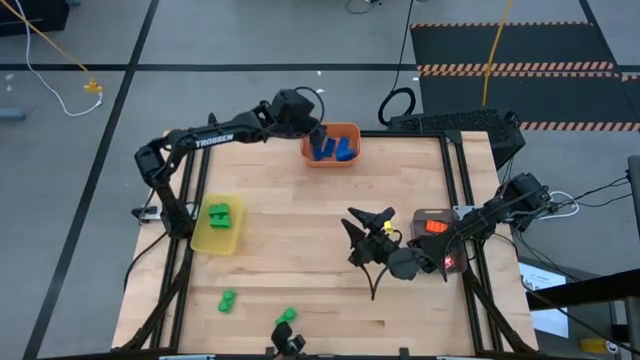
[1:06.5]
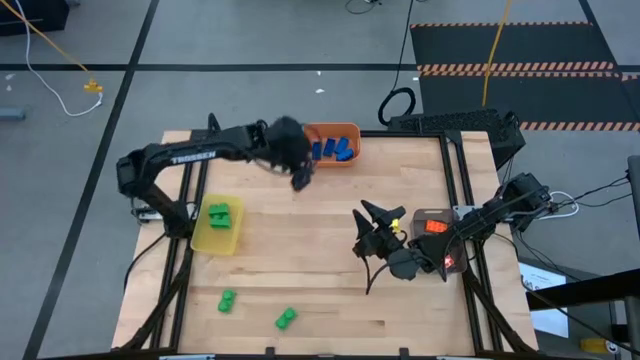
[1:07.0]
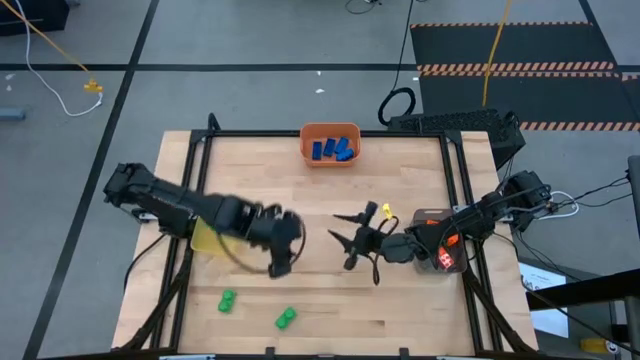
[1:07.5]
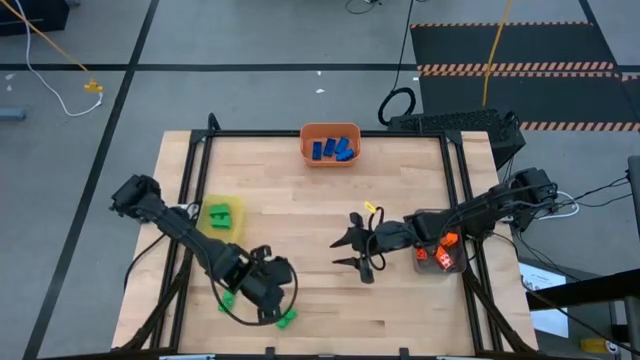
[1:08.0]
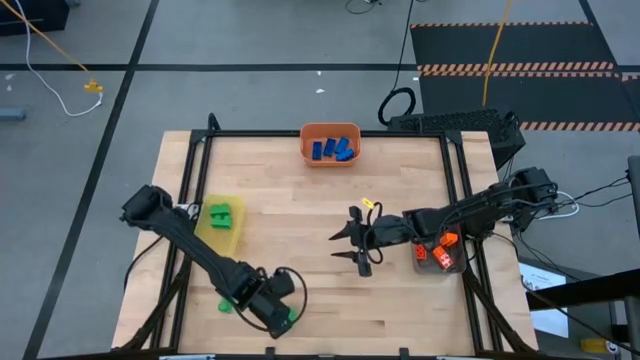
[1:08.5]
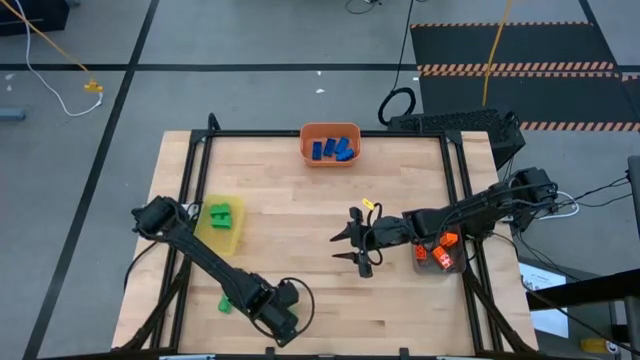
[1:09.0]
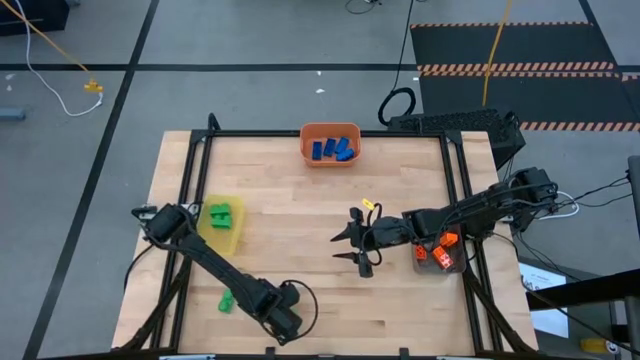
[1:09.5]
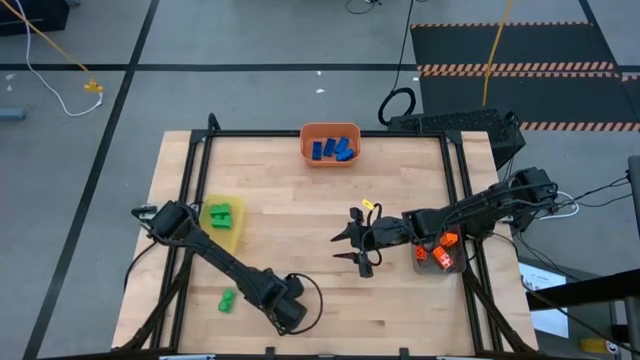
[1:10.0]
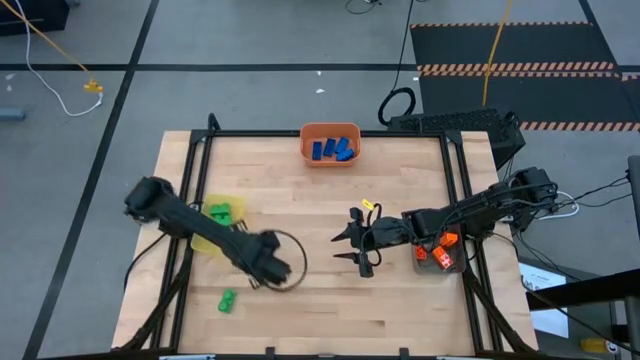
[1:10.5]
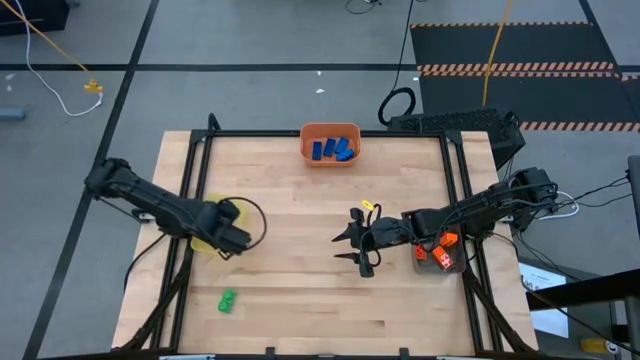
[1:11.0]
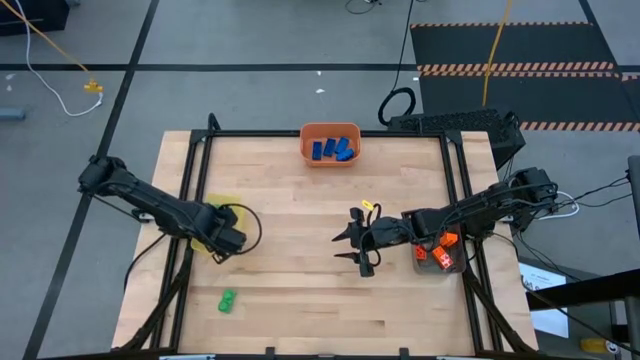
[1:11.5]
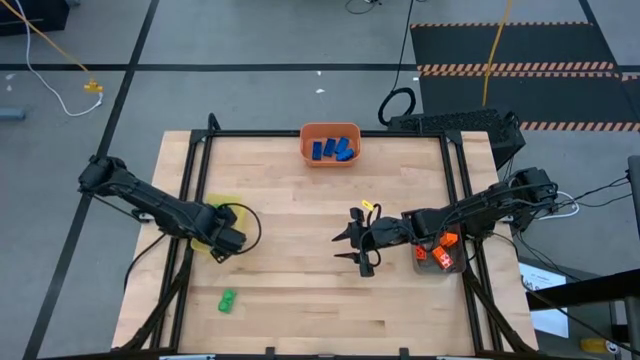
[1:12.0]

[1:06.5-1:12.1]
Task: Sort & place blocks by color
Put the green game piece into the yellow bin

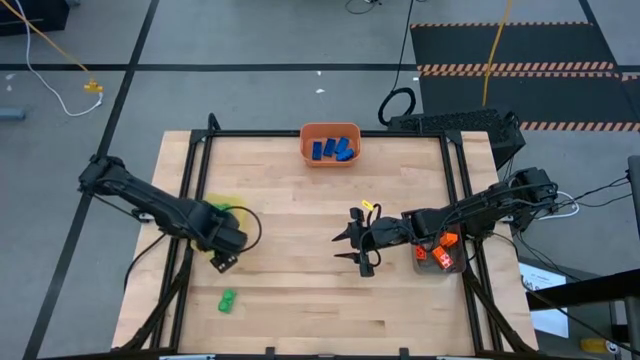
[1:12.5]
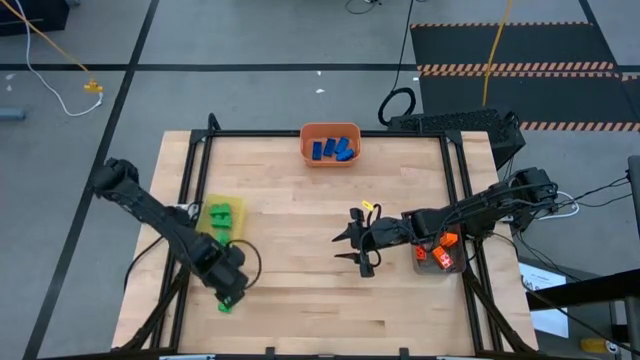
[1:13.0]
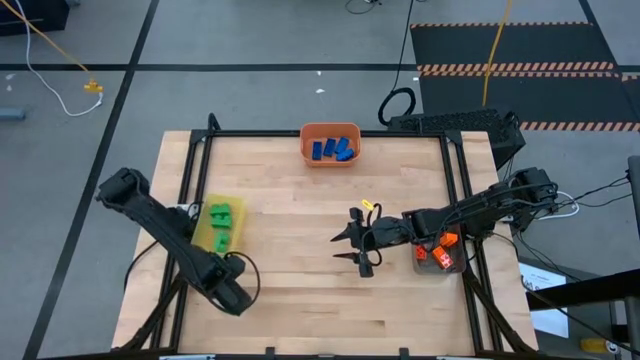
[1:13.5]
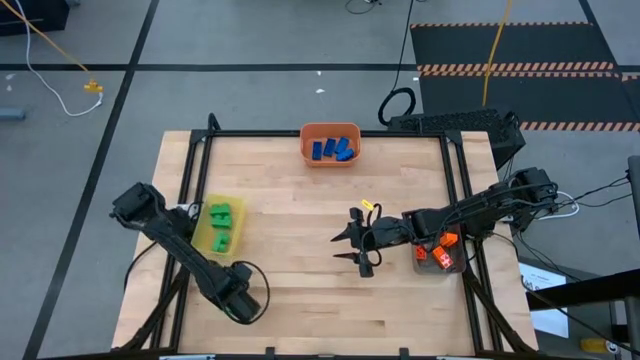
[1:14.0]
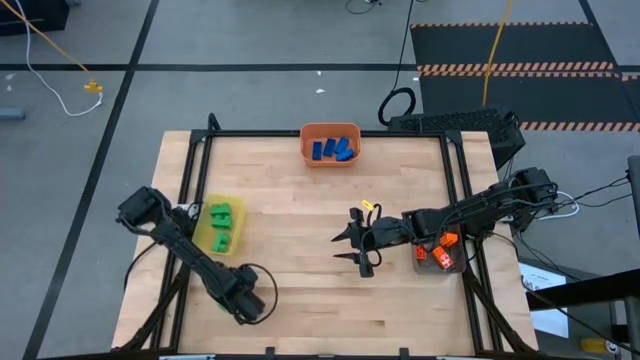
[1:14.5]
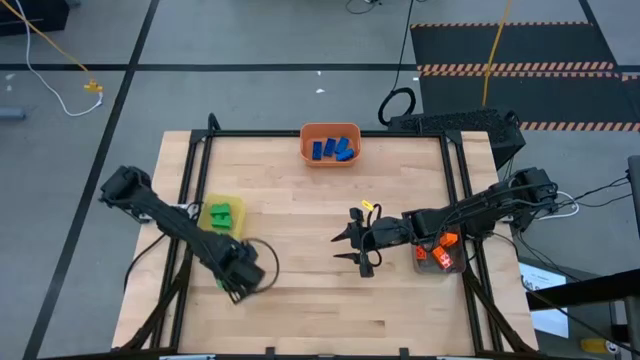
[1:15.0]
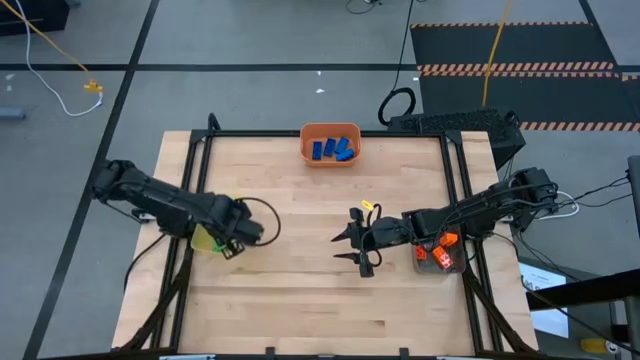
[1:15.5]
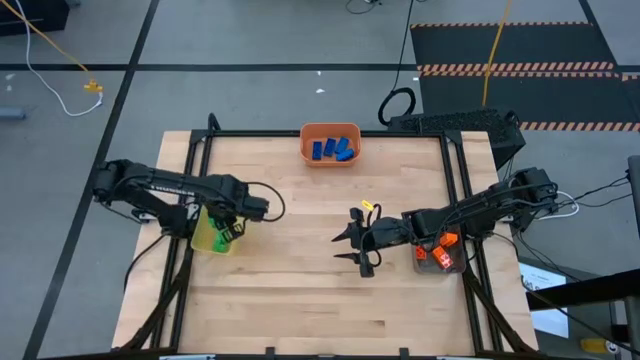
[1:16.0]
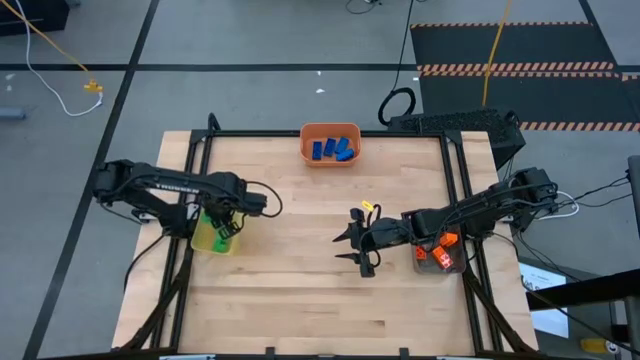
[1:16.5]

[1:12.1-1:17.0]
Put the green game piece into the yellow bin

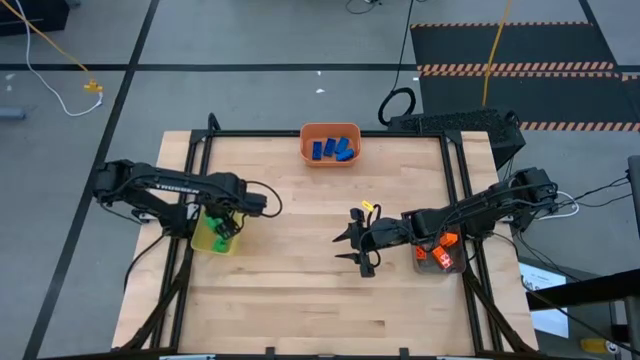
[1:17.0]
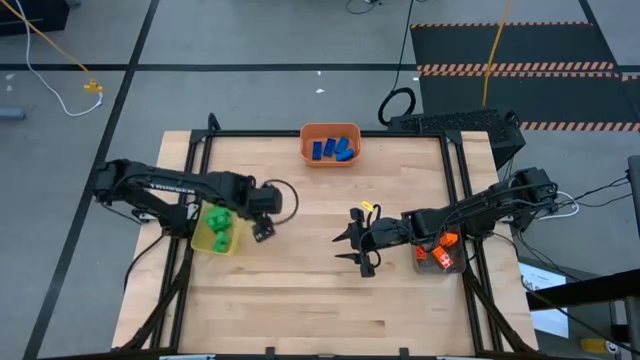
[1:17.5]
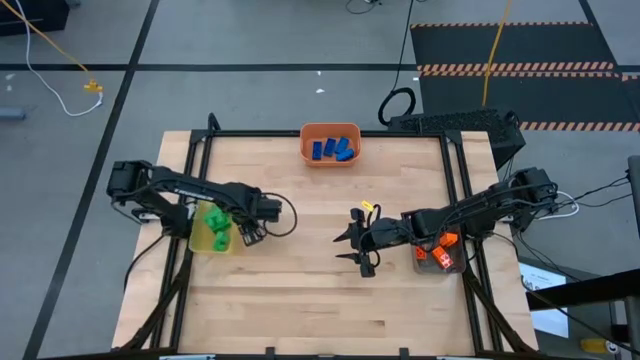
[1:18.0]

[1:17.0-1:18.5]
Adjust the yellow bin

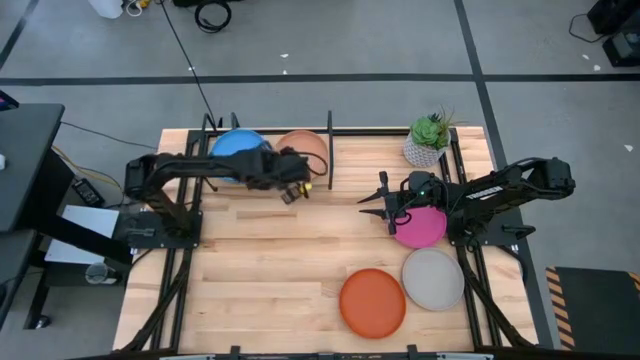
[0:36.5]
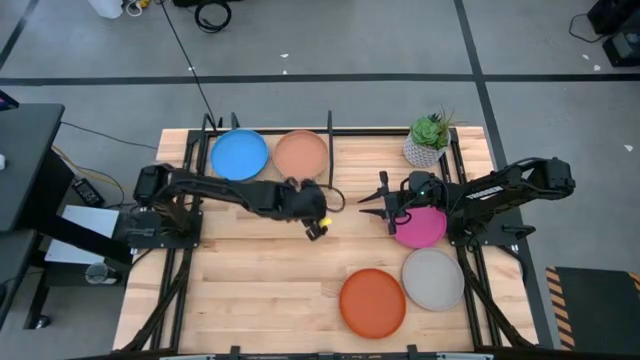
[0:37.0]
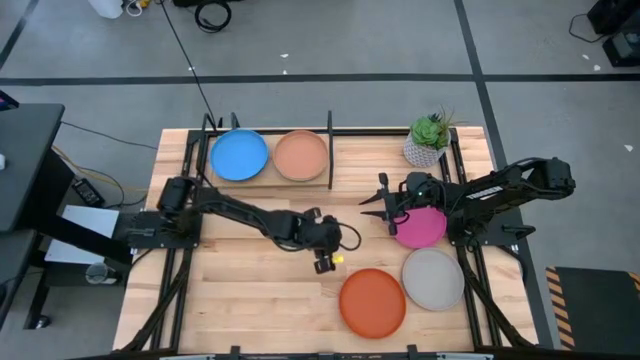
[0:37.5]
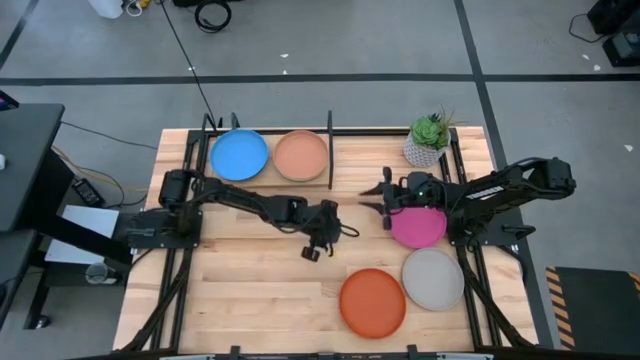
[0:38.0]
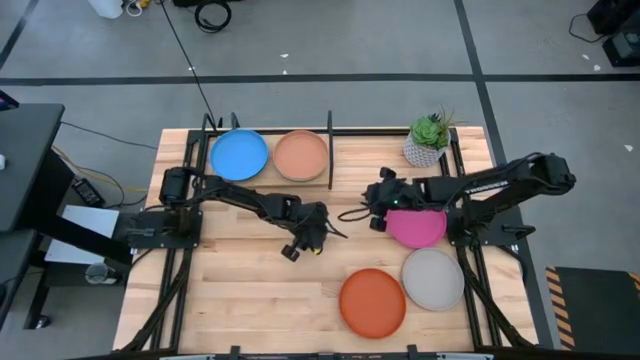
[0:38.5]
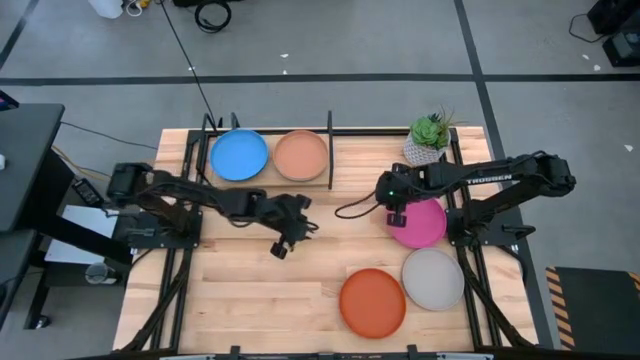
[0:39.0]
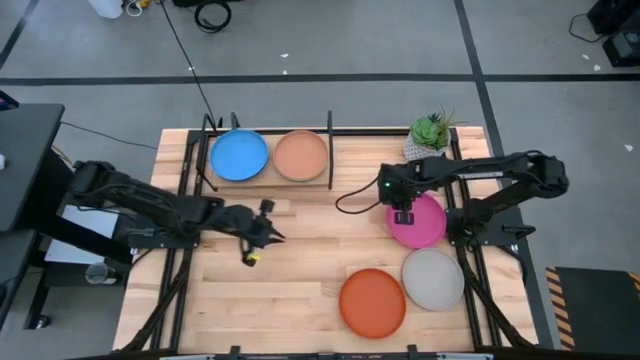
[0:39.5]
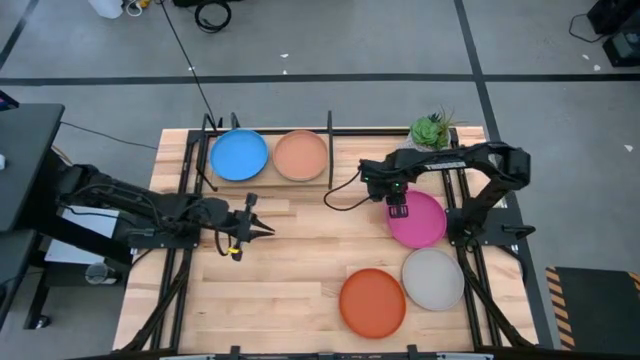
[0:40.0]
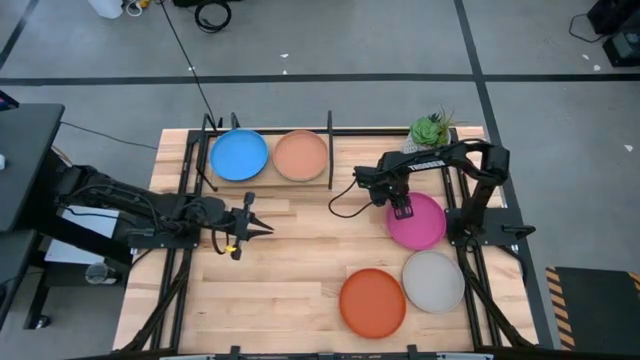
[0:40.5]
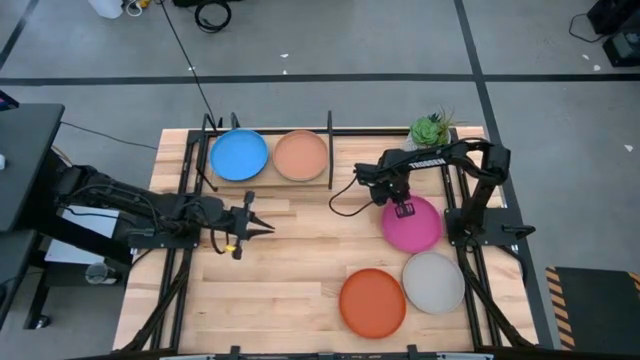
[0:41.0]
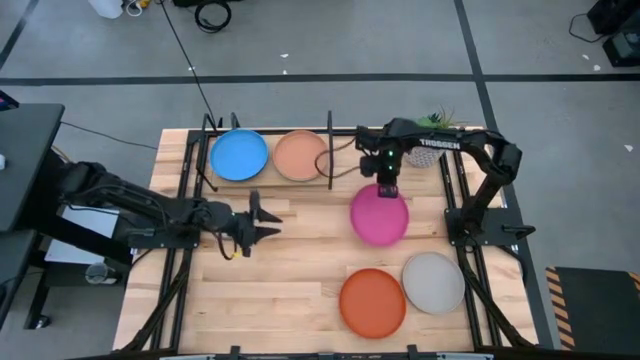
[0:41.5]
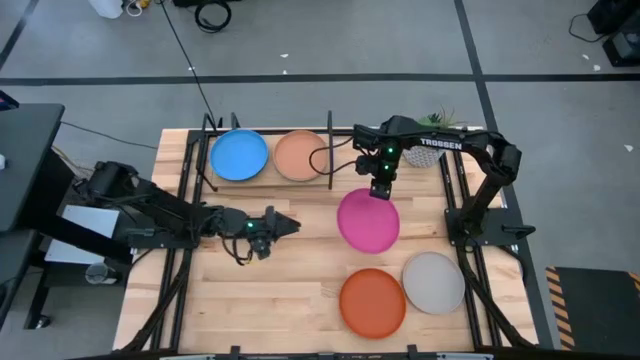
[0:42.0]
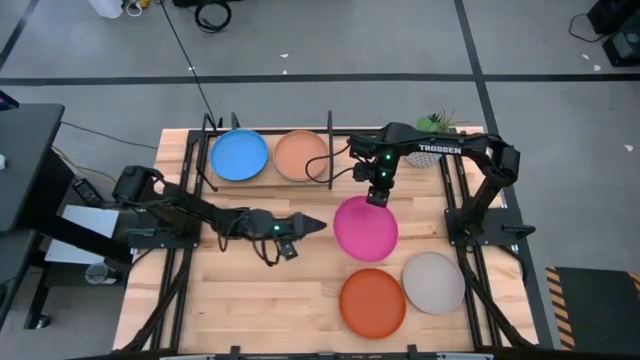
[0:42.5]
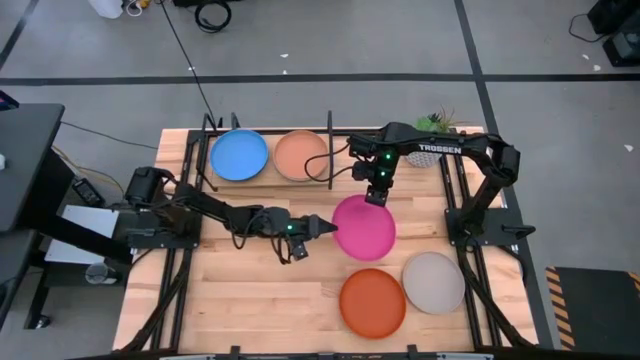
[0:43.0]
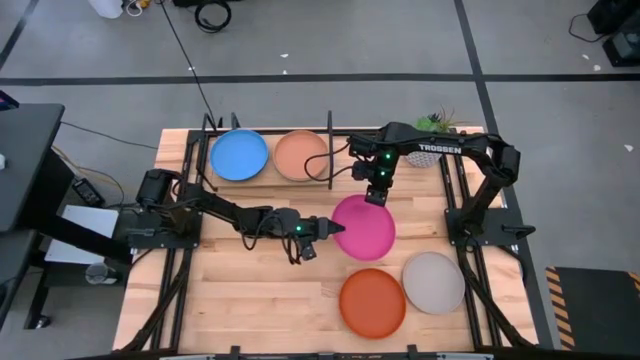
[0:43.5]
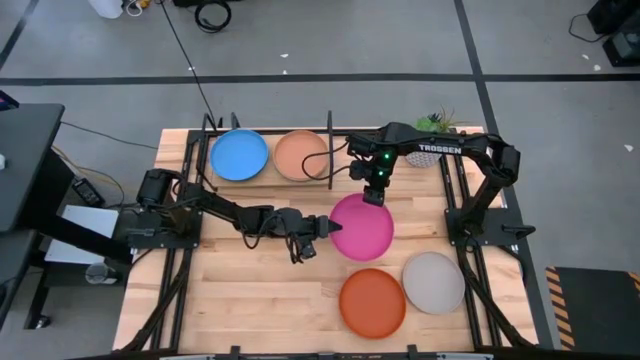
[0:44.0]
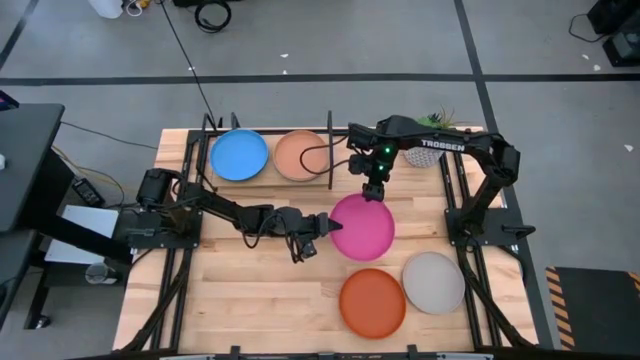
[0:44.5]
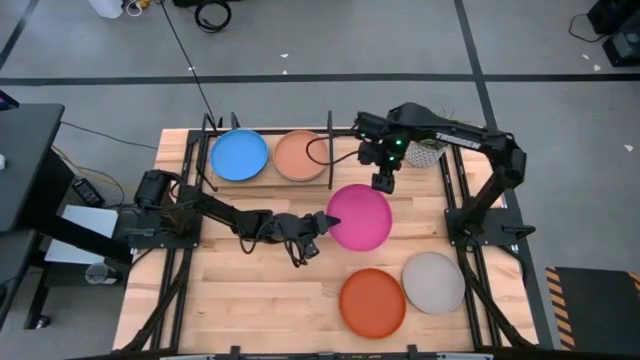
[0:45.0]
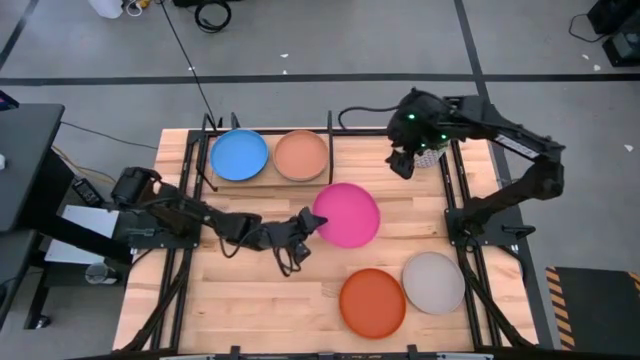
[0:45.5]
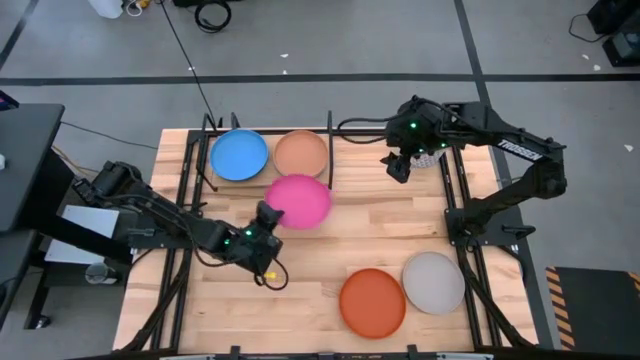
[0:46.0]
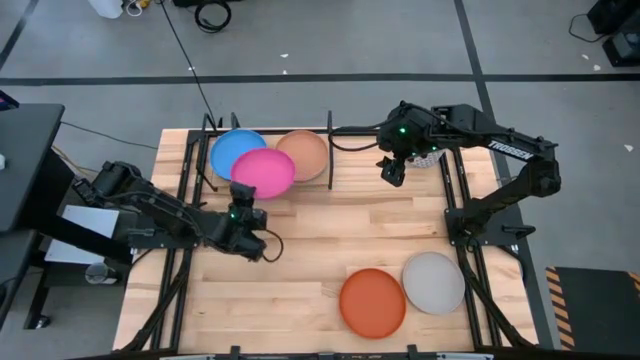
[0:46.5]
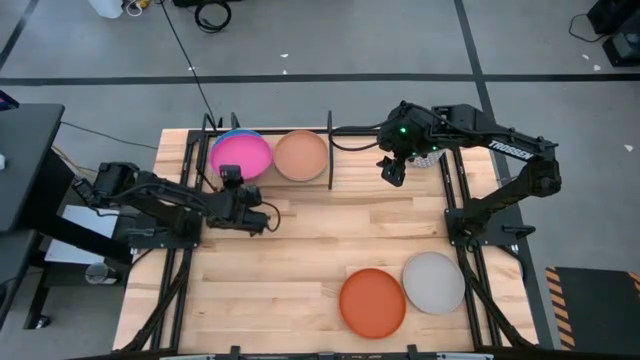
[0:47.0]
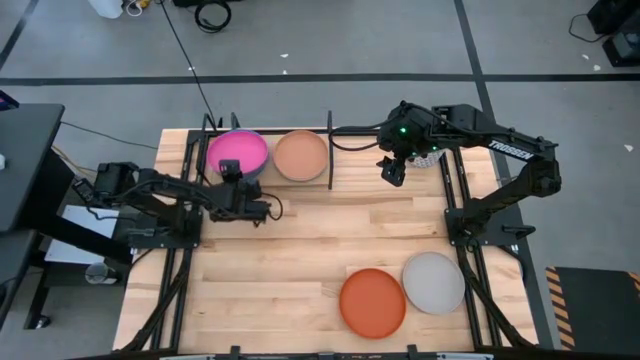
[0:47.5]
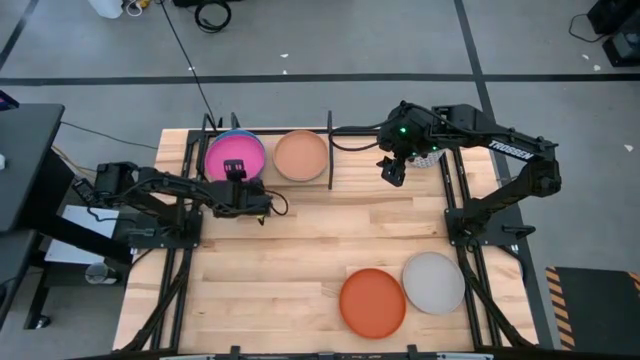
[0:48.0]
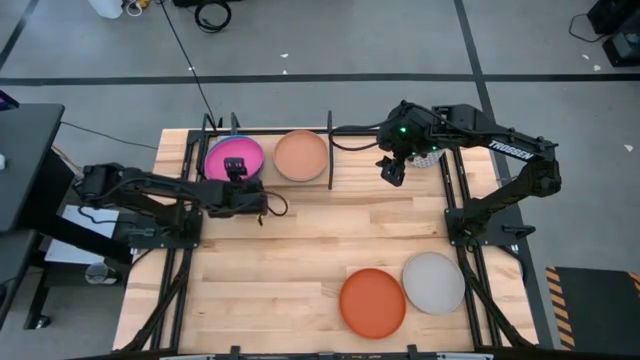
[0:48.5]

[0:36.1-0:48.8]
Task: Place and stack plates onto a shelf
Stack the pink plate on top of the light blue plate on the shelf
